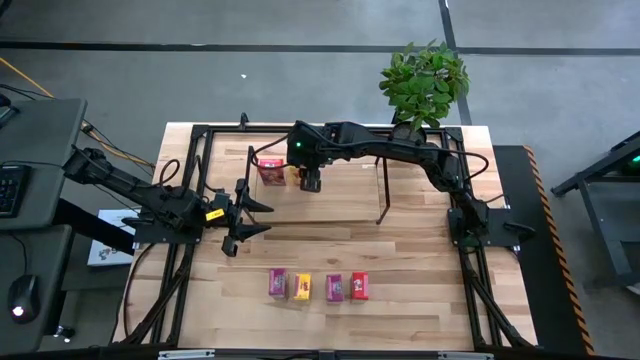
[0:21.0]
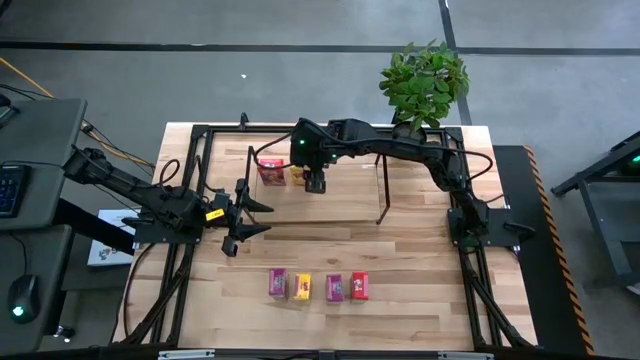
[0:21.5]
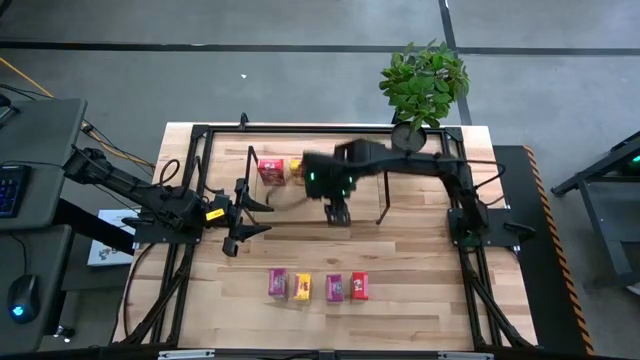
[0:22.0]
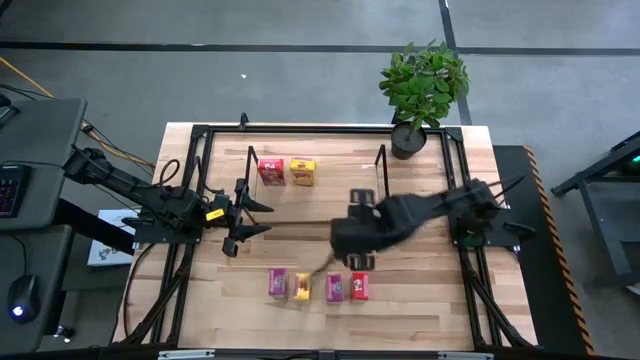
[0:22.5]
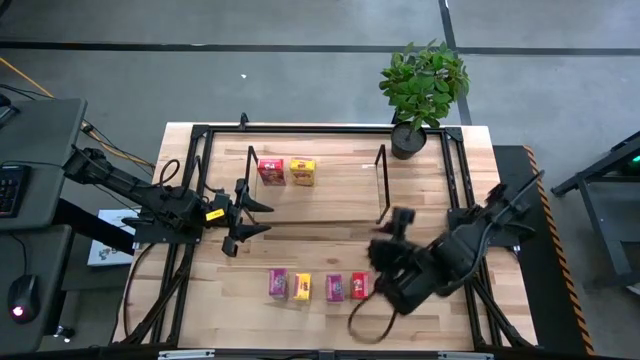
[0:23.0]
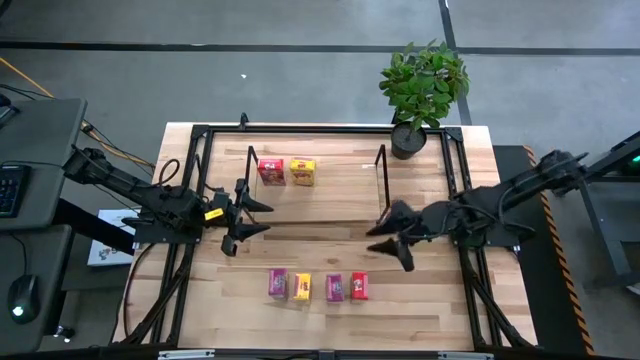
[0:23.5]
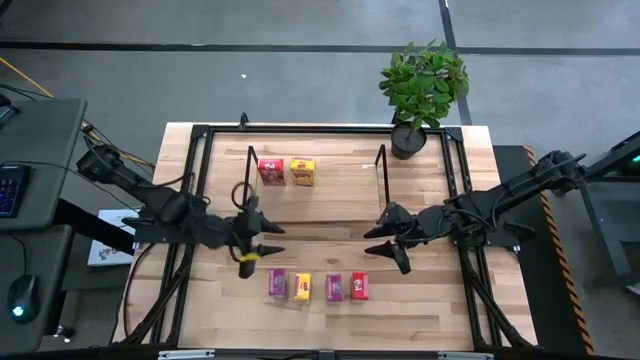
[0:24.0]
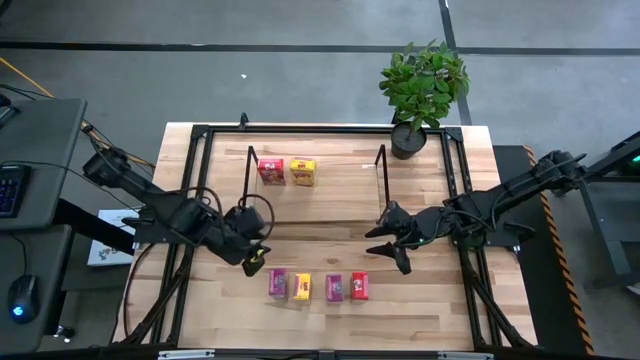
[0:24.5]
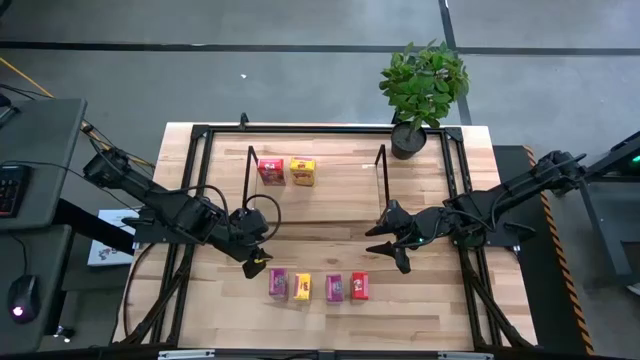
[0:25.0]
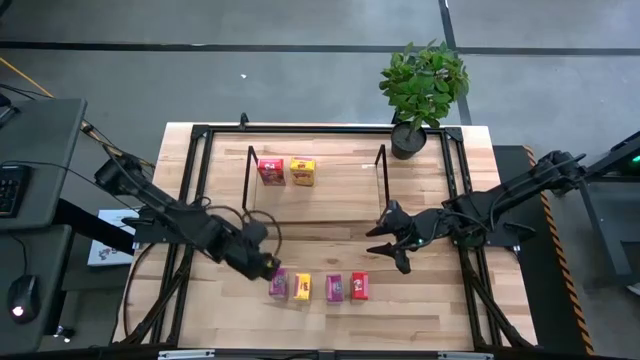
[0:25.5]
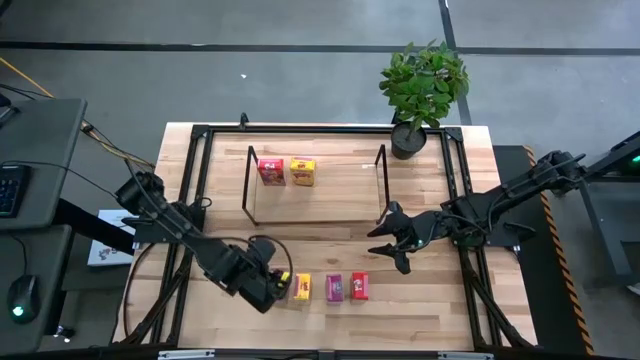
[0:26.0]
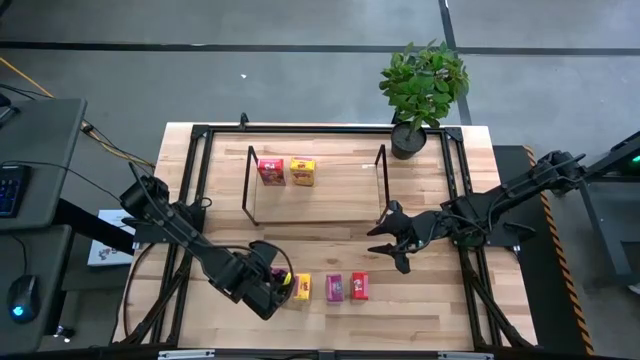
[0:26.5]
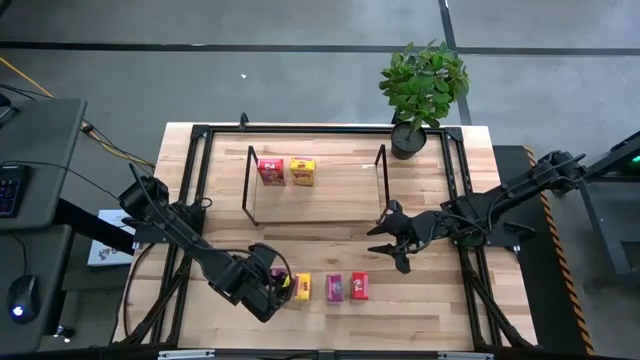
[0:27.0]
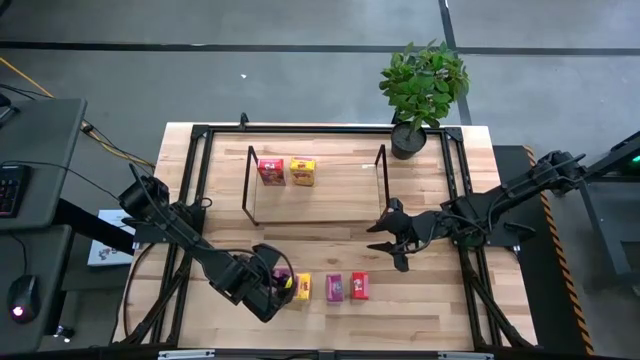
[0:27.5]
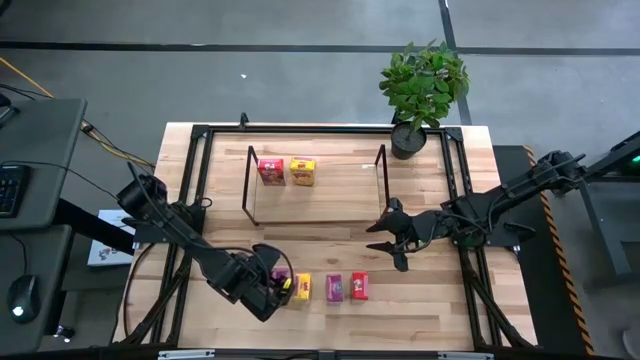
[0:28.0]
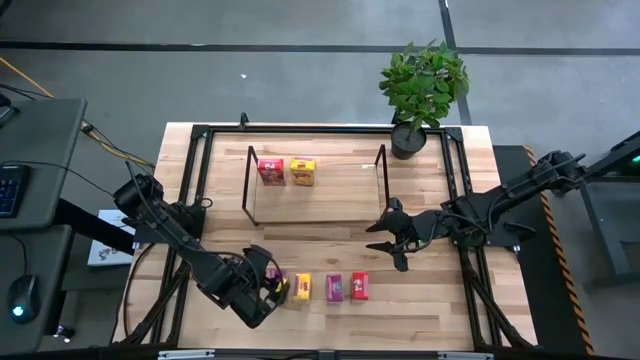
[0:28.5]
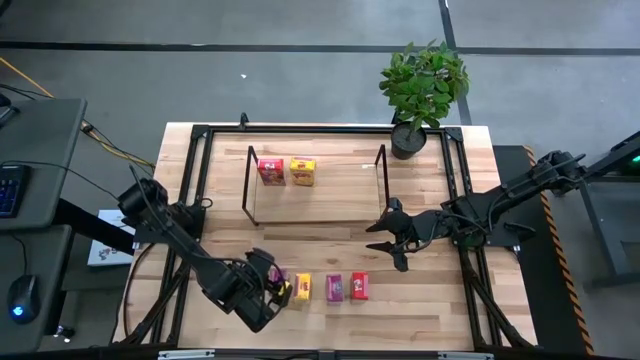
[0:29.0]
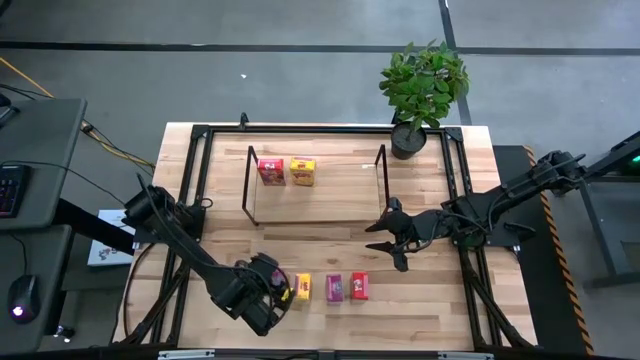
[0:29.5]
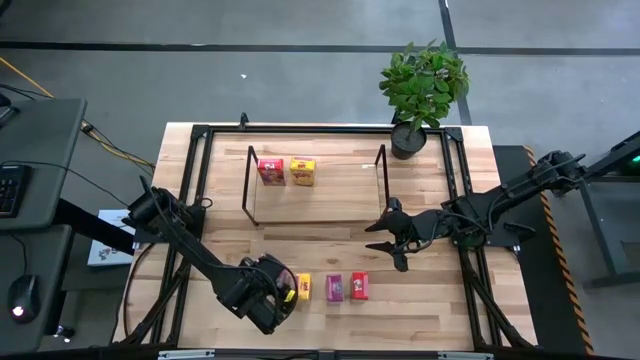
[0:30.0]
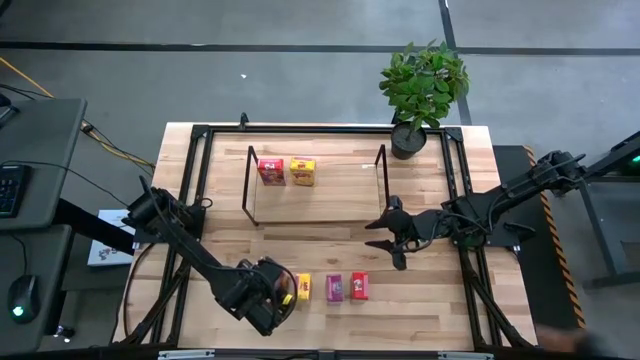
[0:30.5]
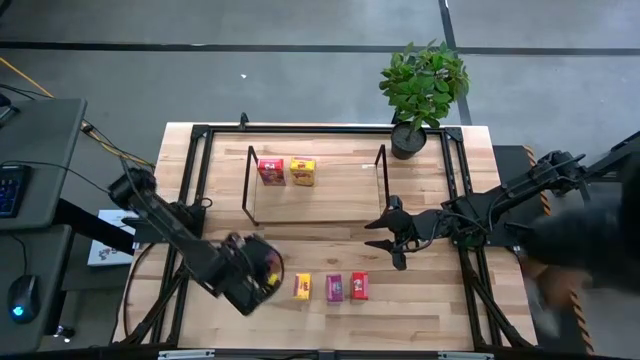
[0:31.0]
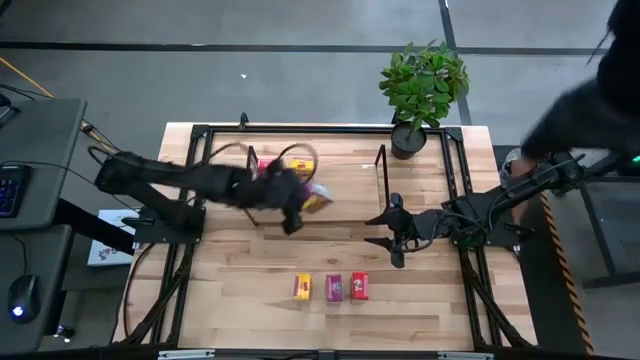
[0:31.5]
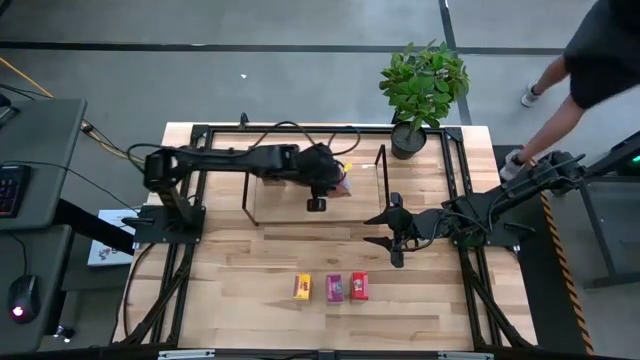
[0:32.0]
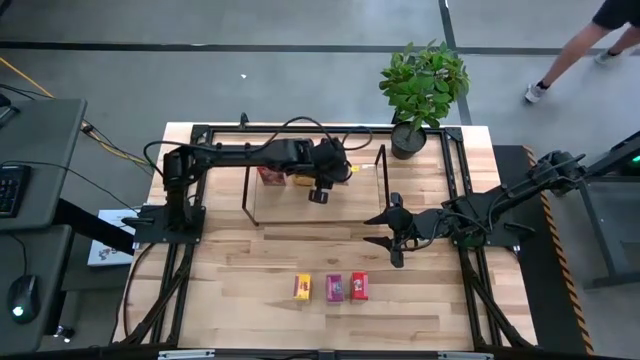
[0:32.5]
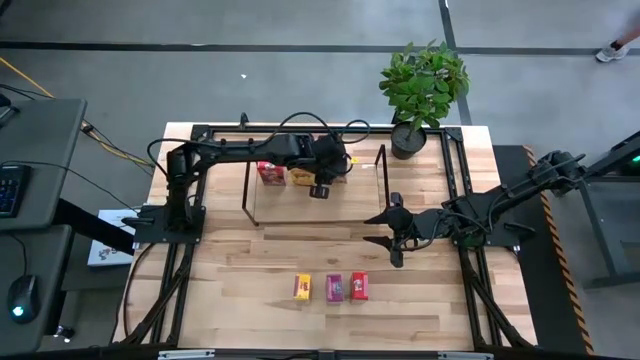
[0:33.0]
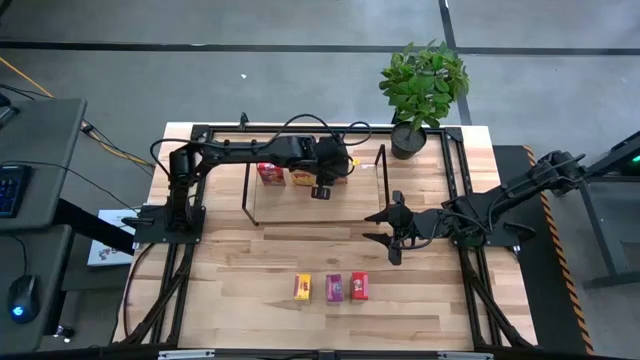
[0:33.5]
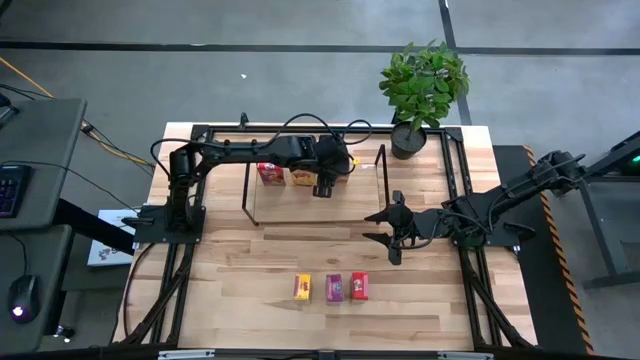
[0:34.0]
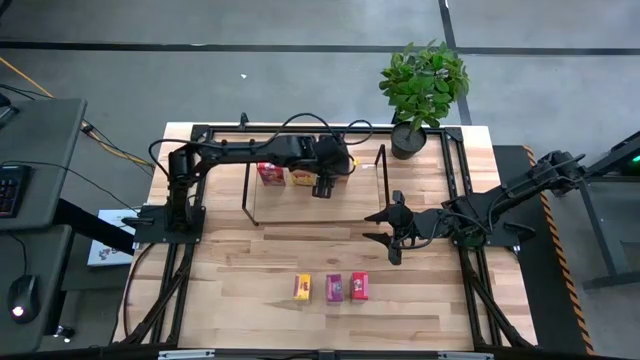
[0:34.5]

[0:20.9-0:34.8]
Task: Stack cereal on shelf
Put the purple cereal box on the shelf

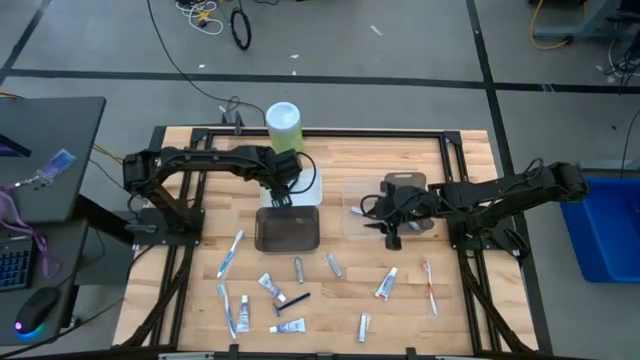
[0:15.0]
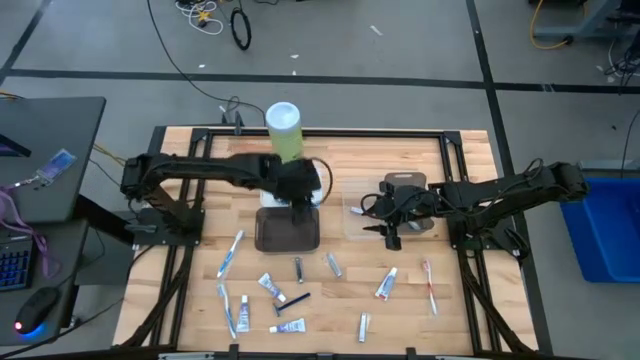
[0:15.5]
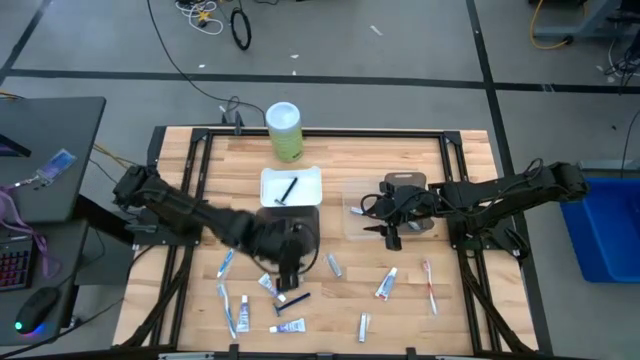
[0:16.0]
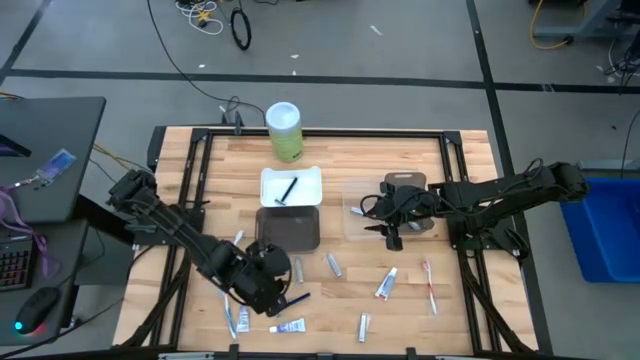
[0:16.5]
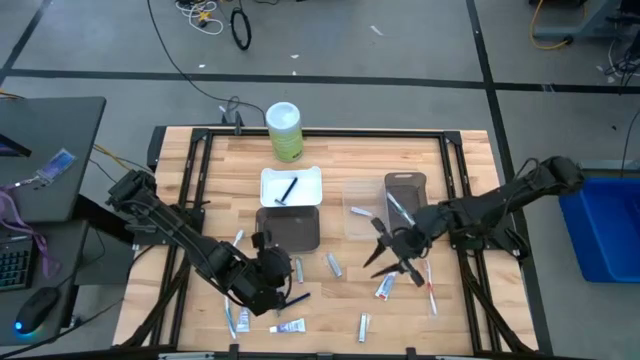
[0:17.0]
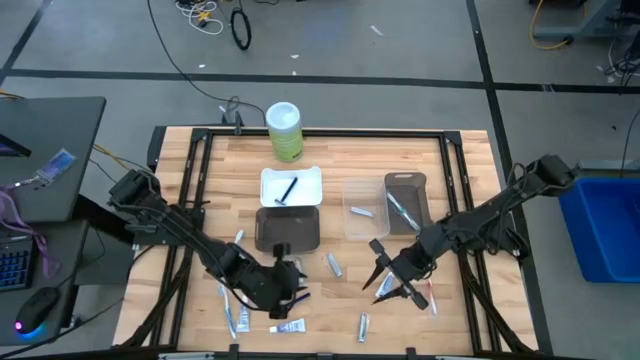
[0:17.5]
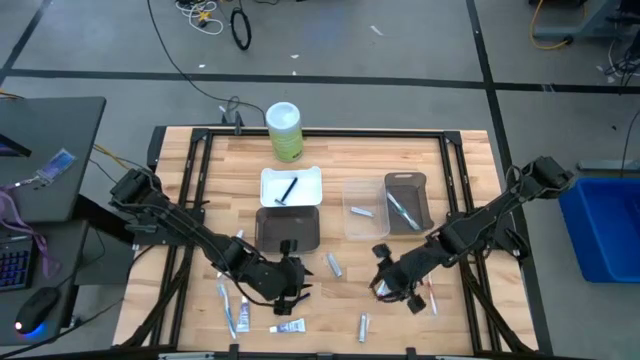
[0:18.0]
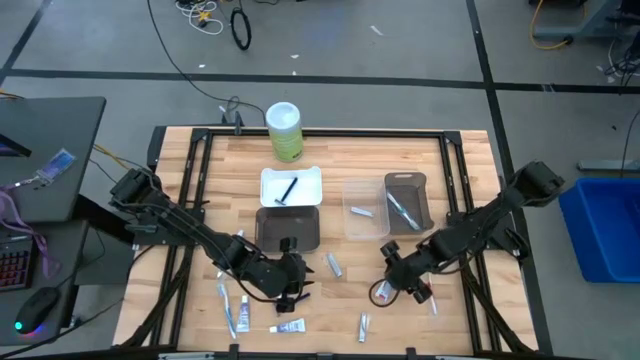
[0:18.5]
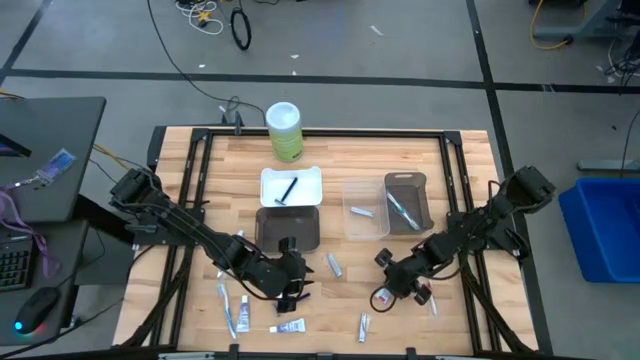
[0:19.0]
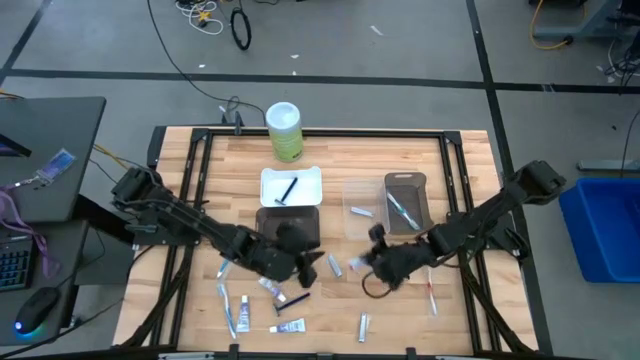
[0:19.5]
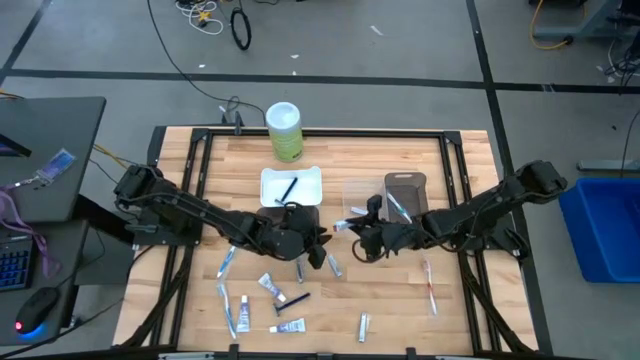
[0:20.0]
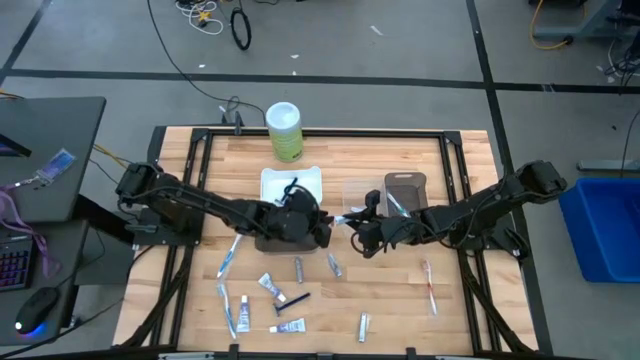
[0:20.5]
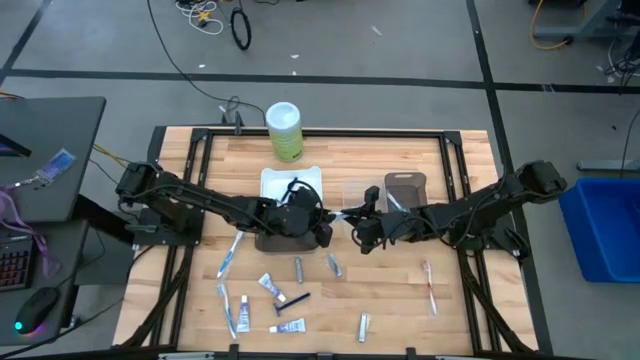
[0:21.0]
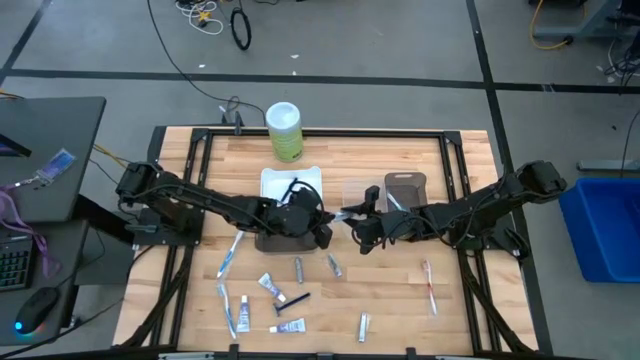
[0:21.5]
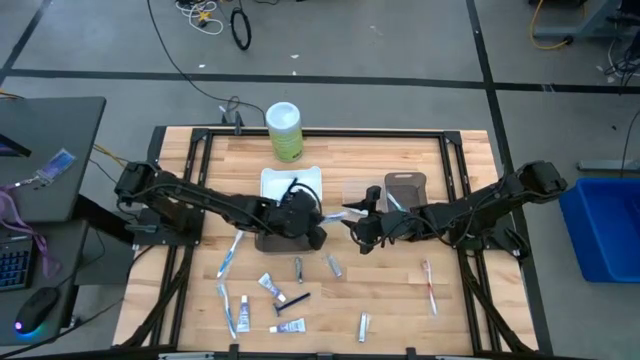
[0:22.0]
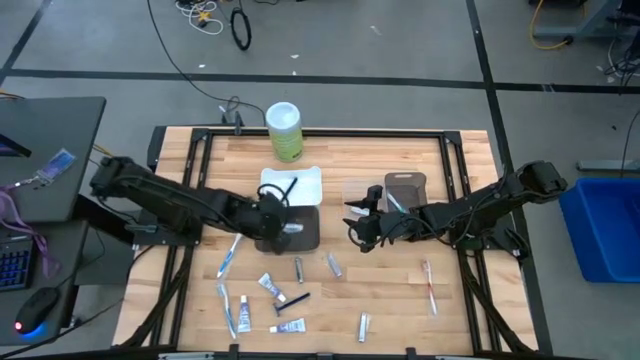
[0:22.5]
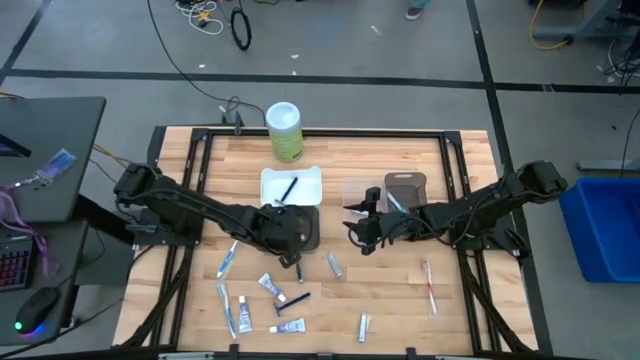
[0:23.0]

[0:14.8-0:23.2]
Task: Pick & Place Travel size toiletries
Put the white toothpaste into the left black bin
